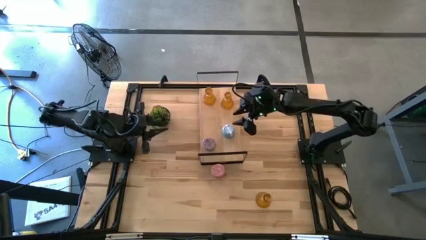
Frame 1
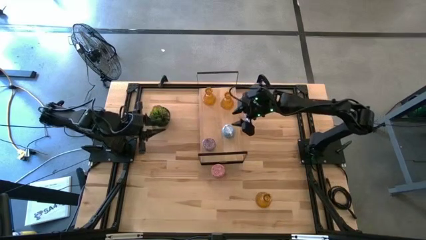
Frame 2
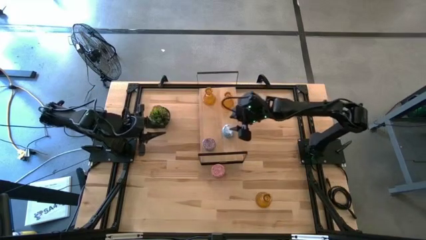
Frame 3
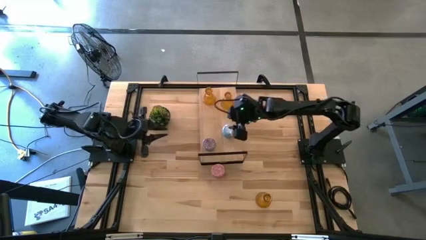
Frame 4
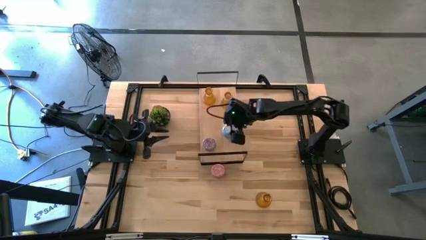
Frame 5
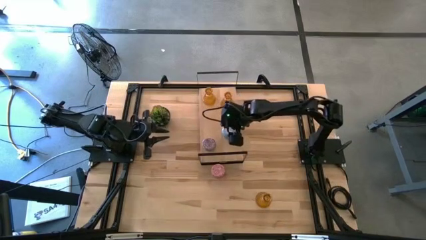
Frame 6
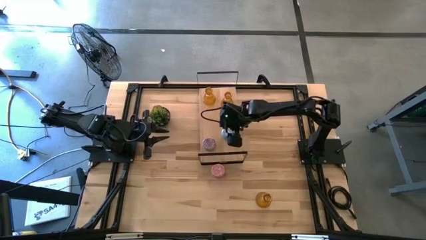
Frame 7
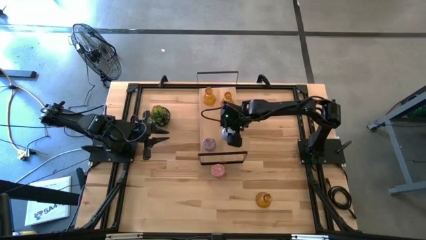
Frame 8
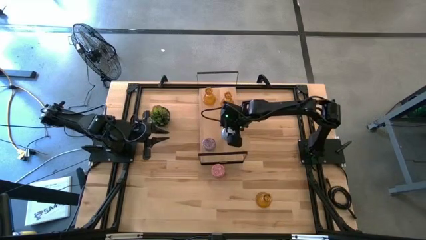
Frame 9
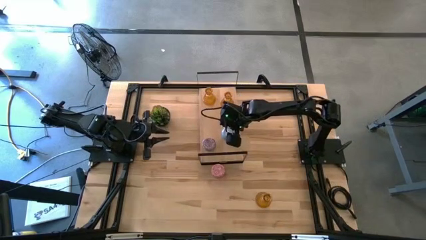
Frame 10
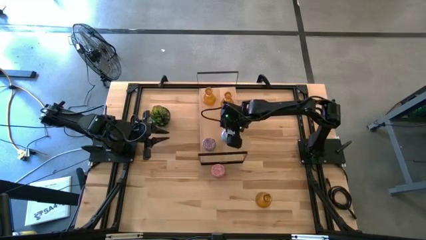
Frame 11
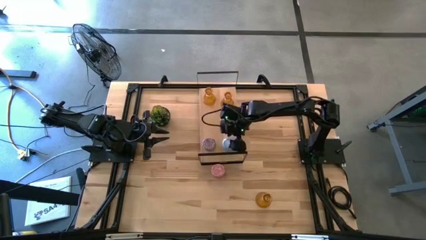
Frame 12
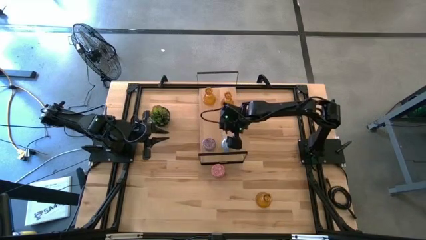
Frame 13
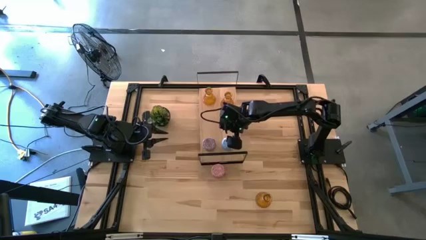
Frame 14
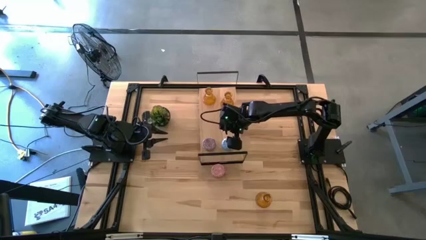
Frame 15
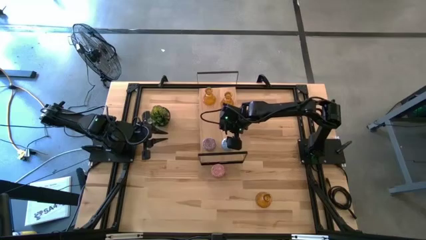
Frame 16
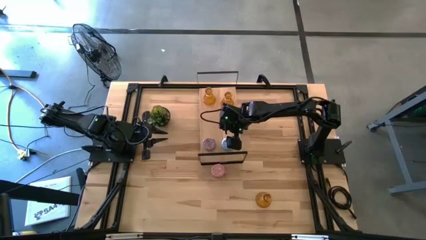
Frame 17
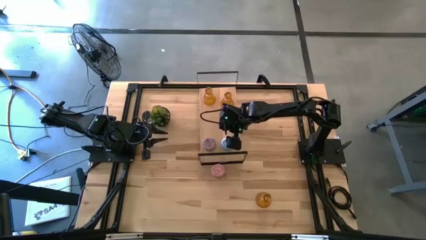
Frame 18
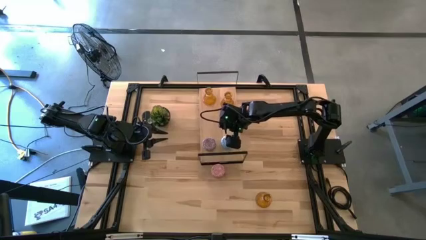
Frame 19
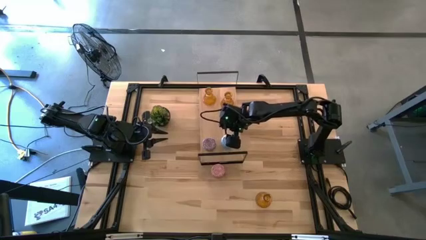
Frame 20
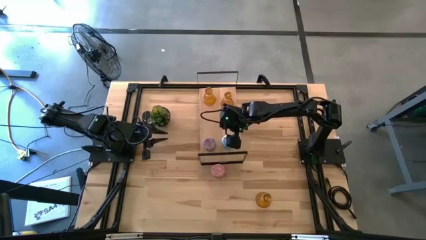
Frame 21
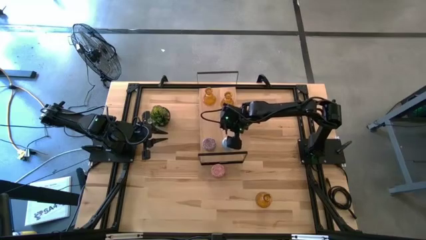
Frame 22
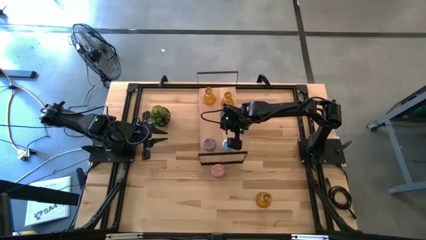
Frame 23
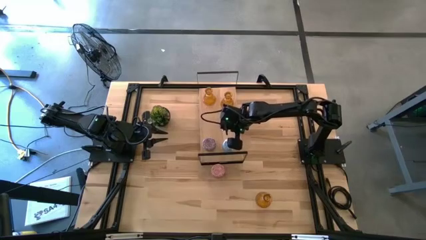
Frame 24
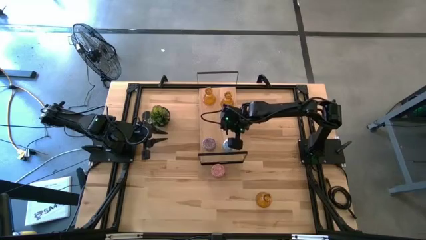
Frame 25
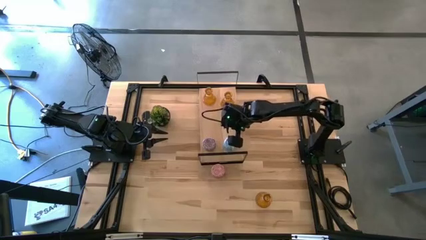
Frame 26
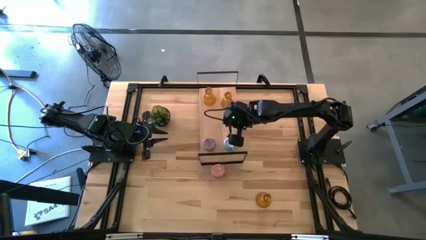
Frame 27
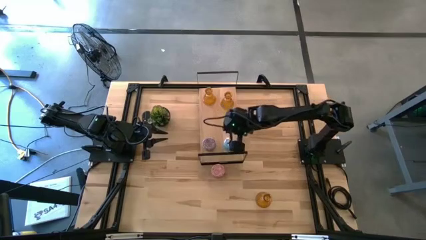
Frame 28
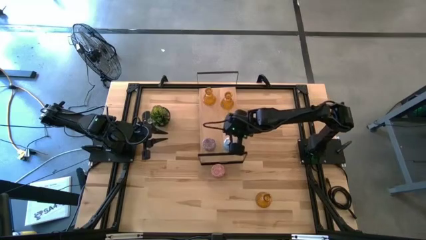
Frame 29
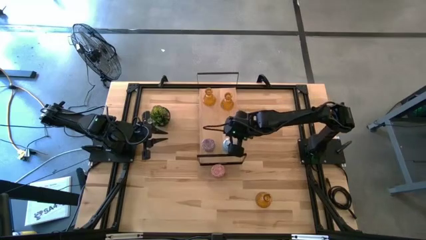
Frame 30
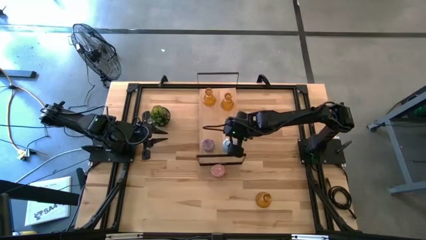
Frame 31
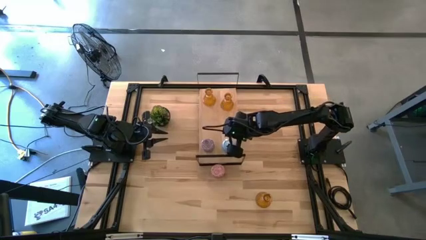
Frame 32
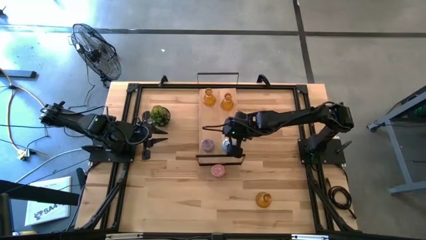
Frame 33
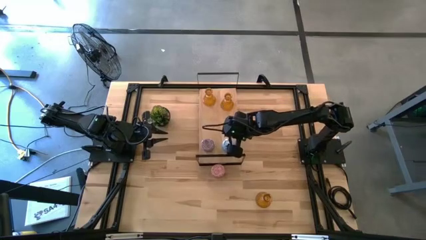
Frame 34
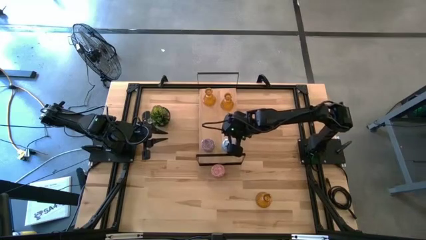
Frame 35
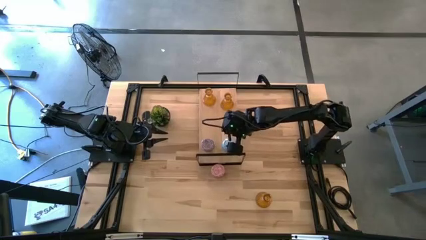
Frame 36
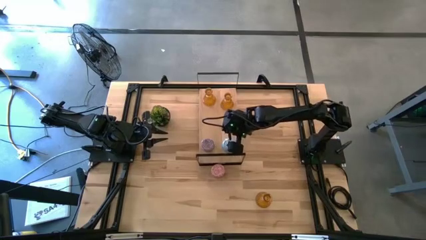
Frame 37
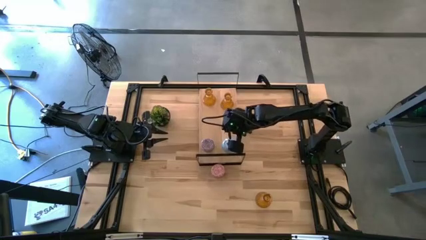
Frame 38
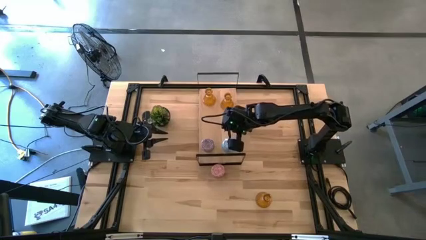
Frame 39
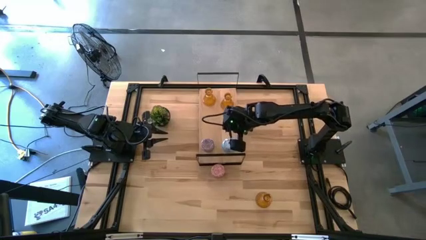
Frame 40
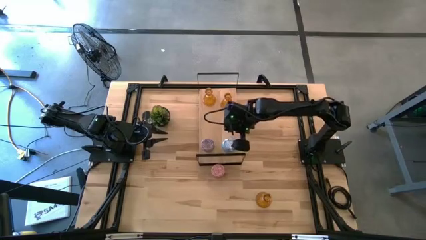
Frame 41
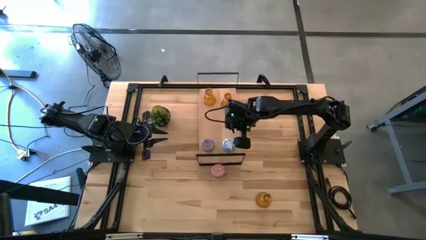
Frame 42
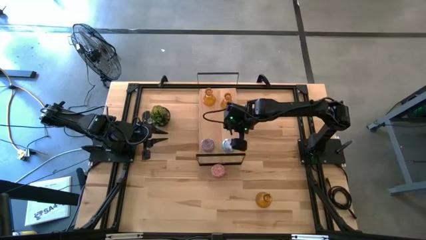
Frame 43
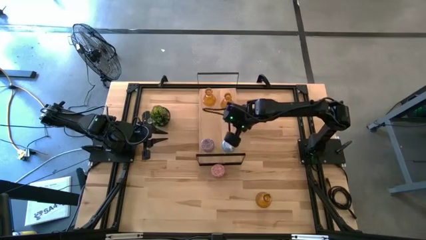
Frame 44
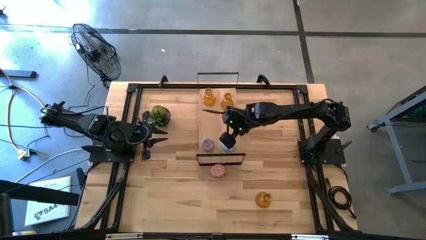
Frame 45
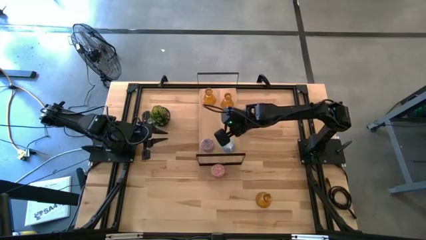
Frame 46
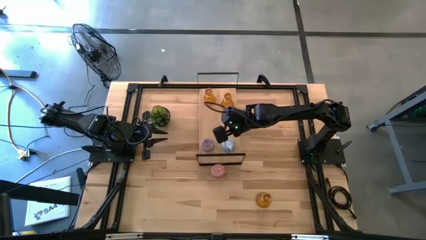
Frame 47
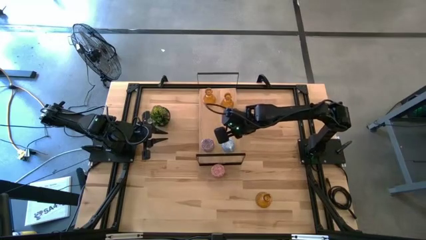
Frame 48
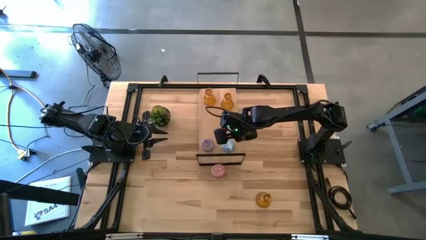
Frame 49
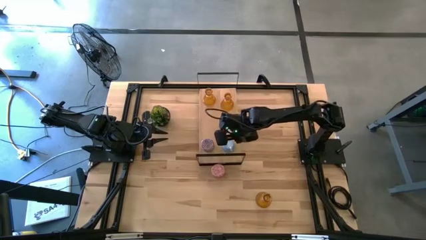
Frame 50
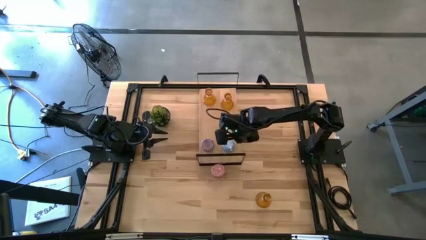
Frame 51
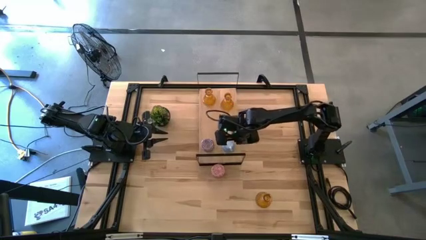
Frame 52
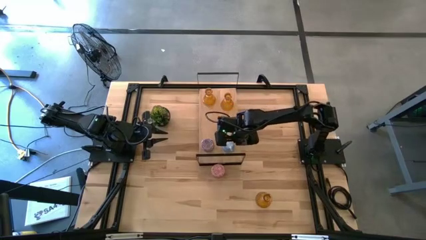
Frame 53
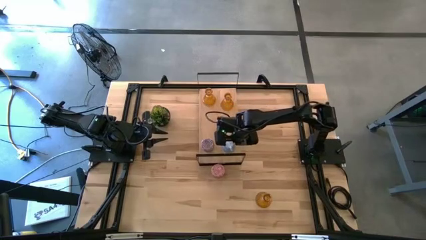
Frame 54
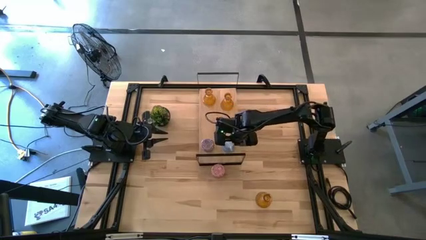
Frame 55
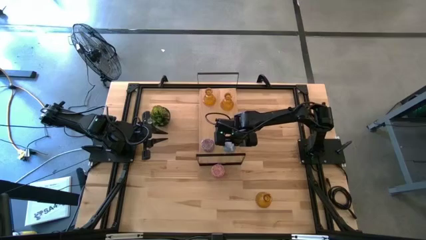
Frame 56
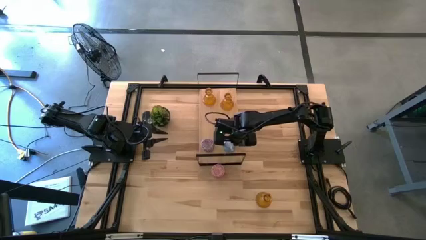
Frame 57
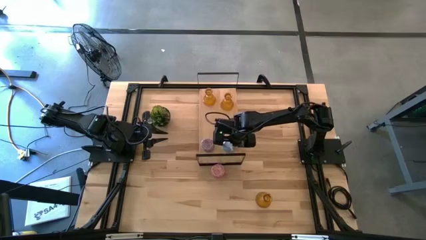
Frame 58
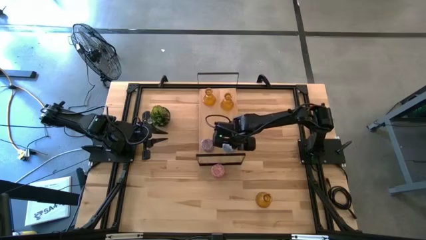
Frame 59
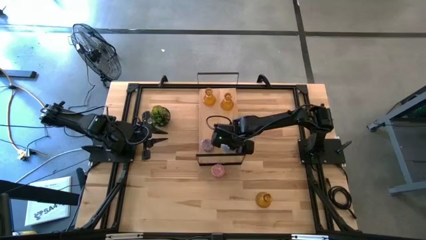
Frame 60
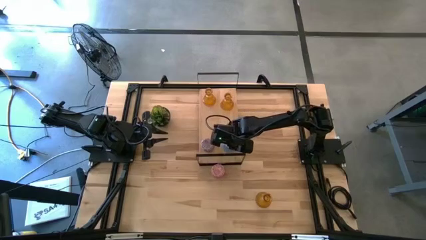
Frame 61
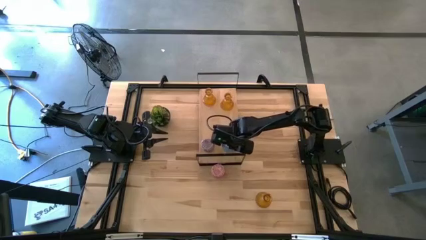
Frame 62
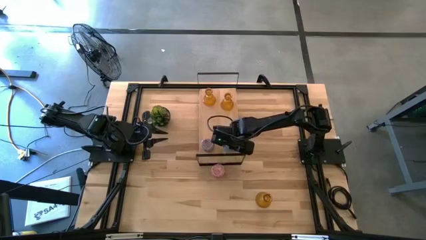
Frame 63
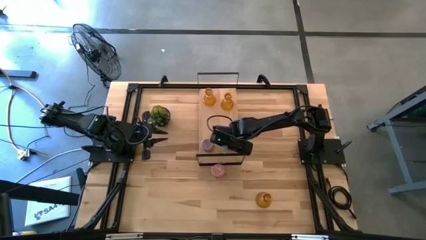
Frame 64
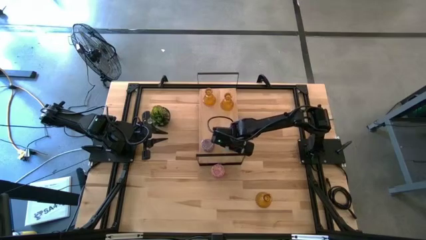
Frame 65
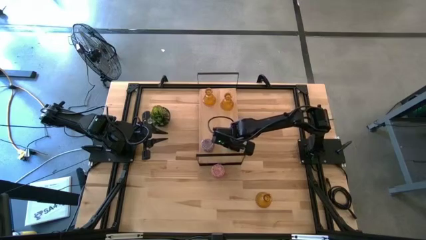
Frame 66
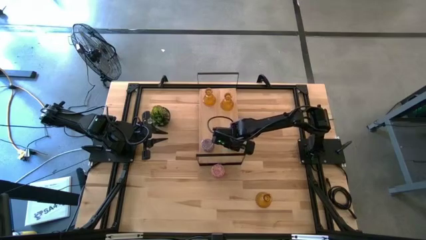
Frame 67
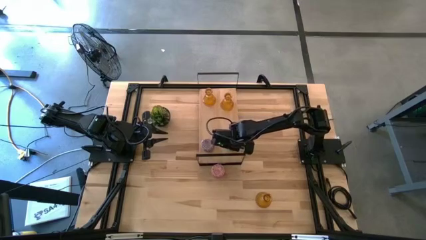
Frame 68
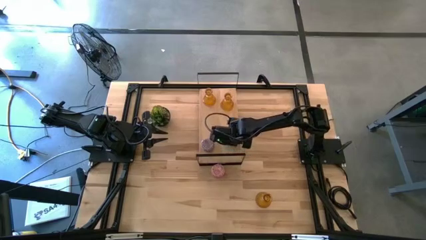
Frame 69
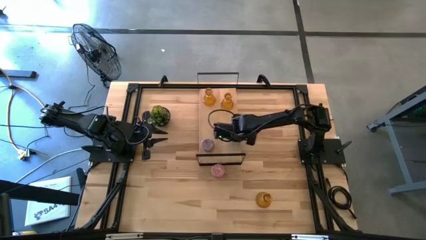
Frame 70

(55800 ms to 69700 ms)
Task: Pick & Place candle stick holders
Put the blue scented candle on the shelf
